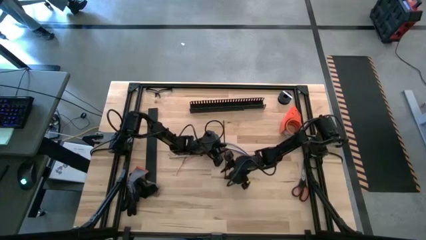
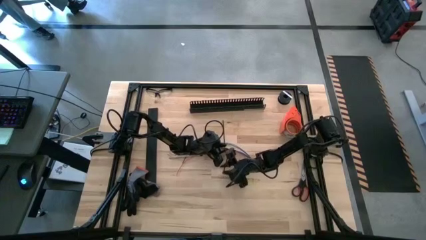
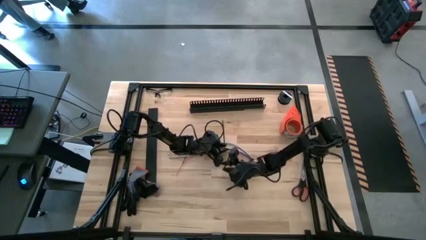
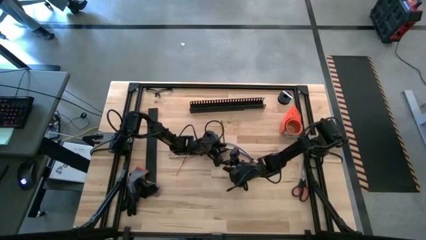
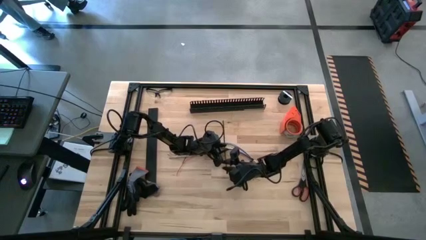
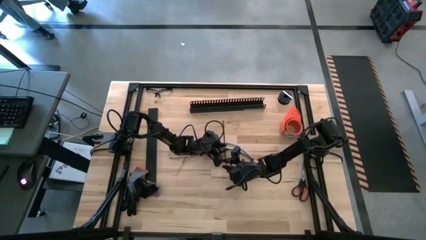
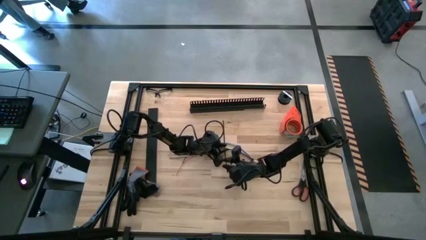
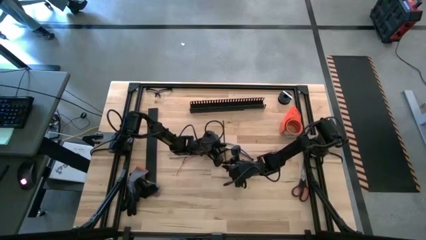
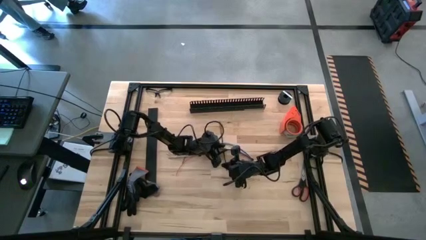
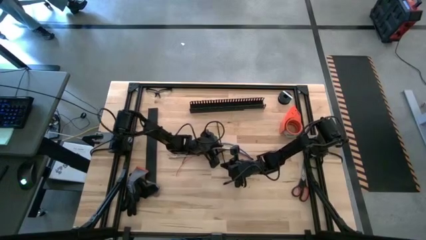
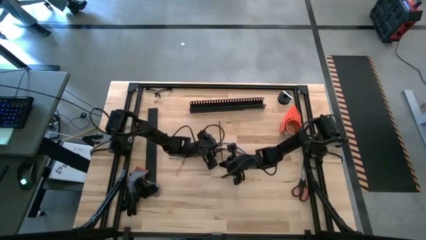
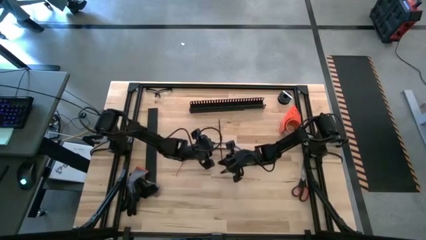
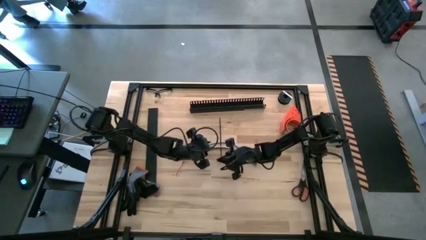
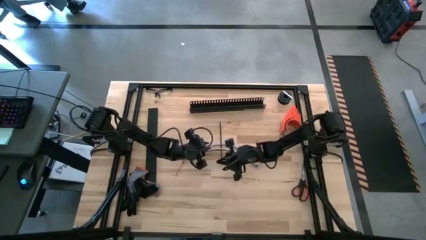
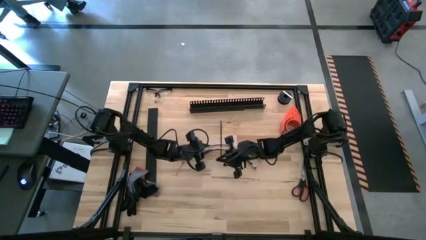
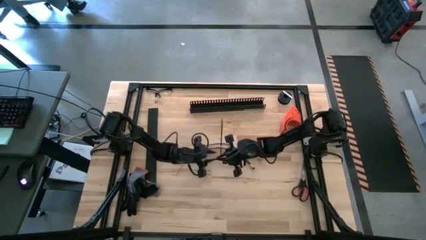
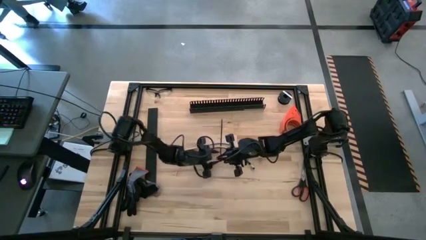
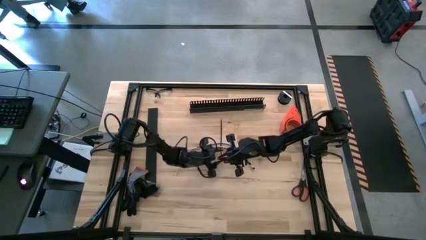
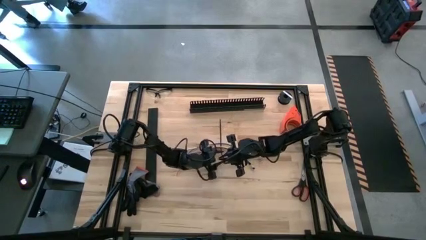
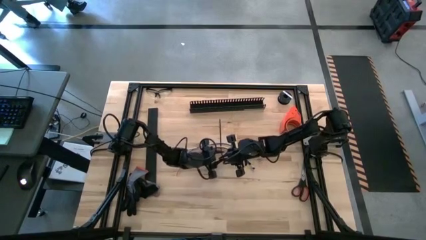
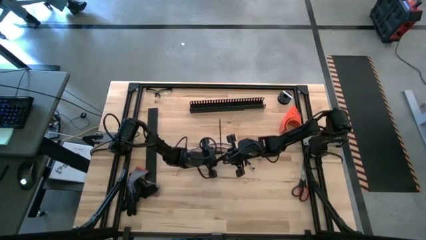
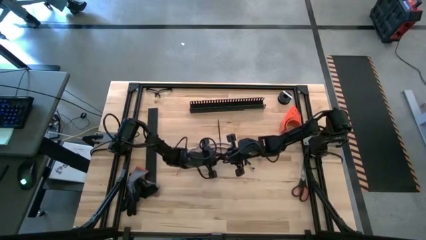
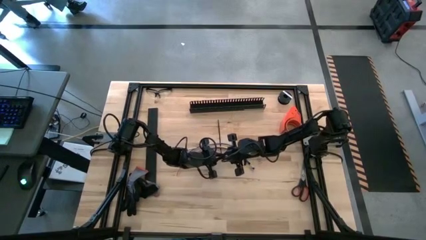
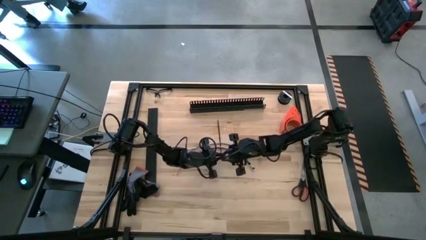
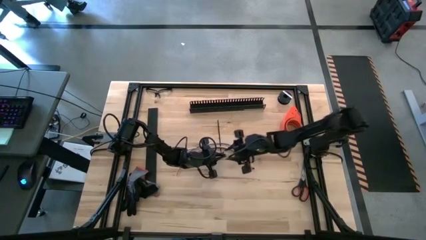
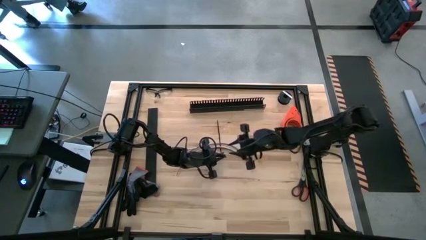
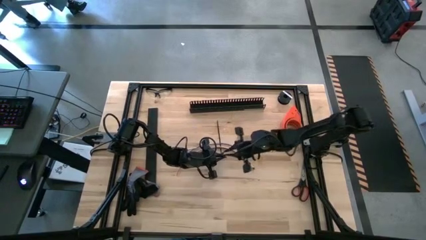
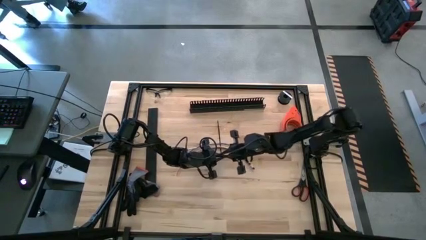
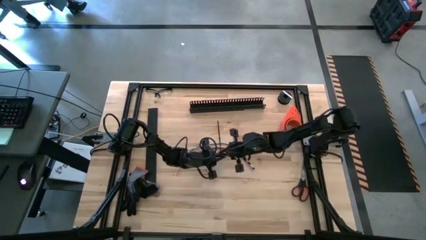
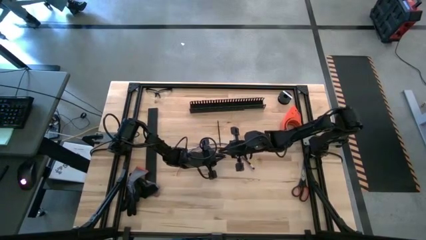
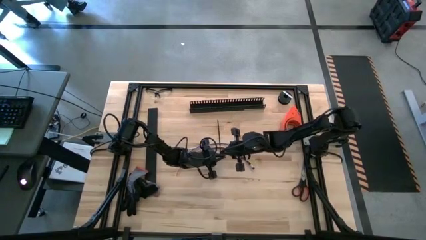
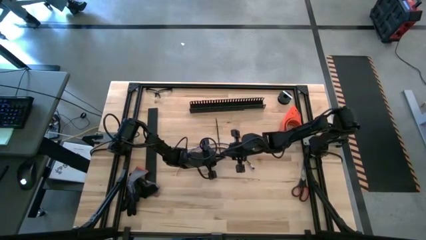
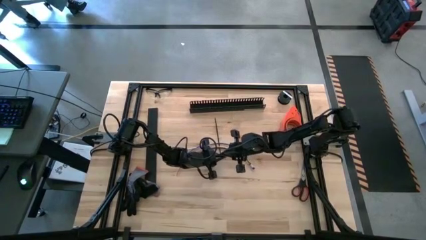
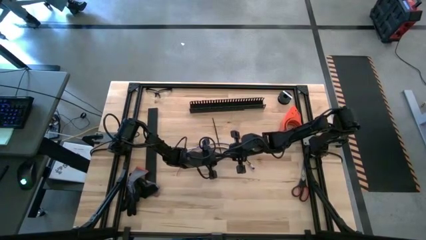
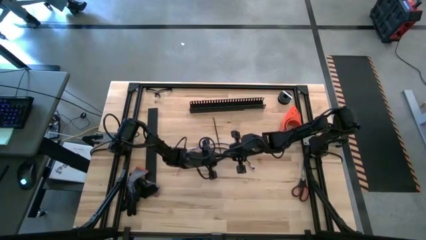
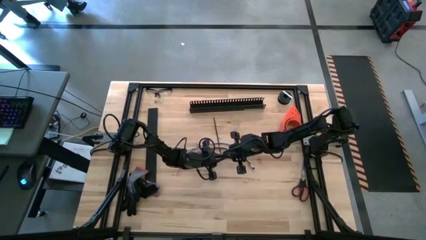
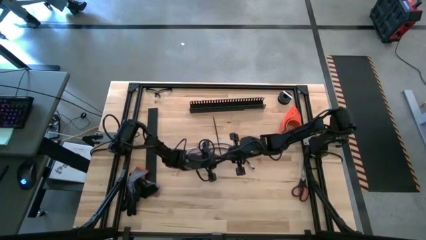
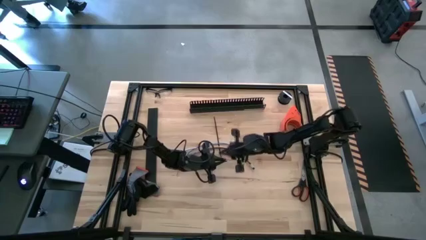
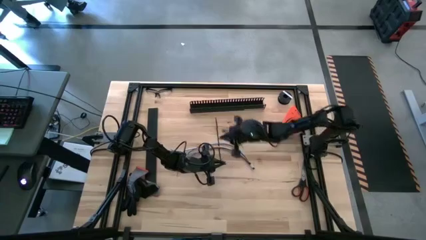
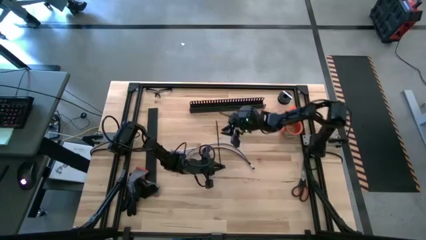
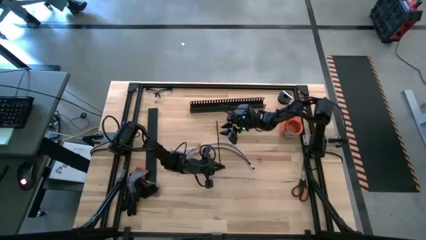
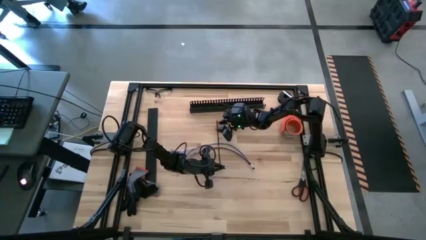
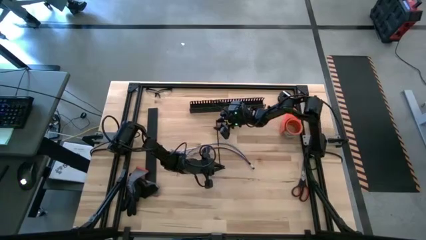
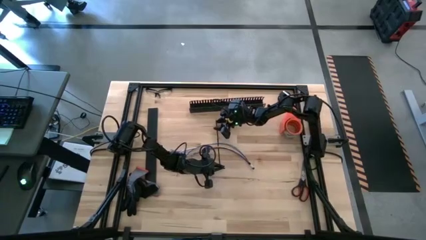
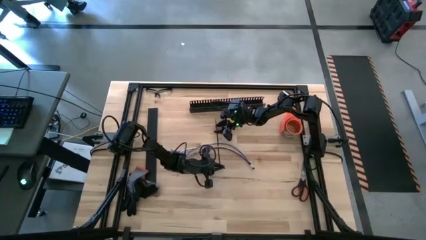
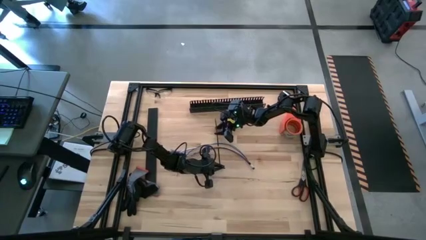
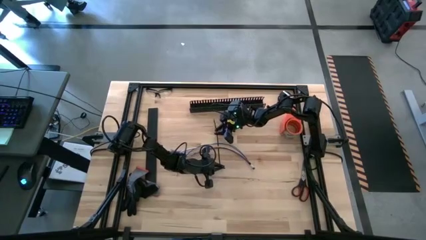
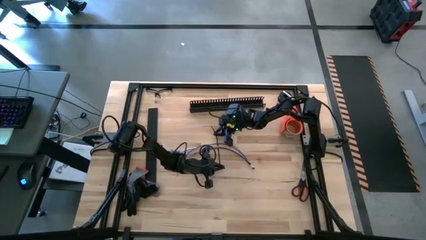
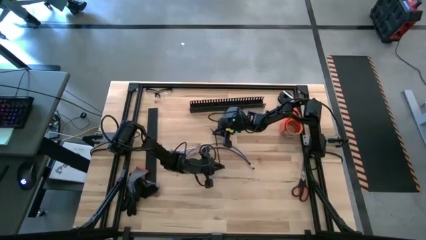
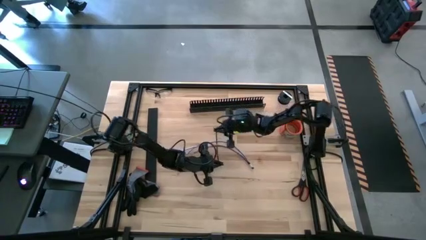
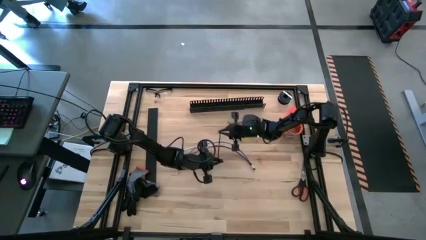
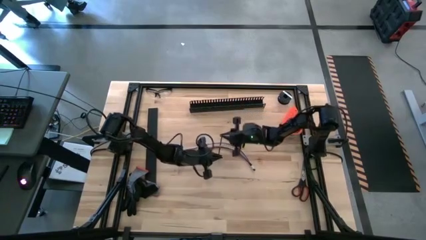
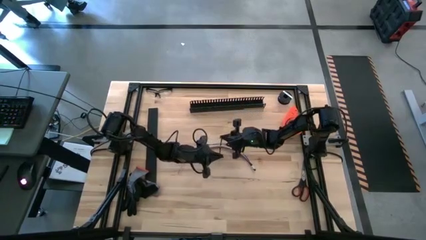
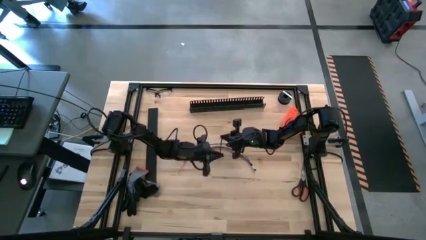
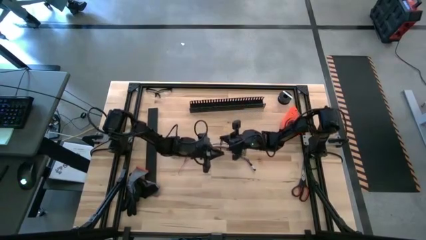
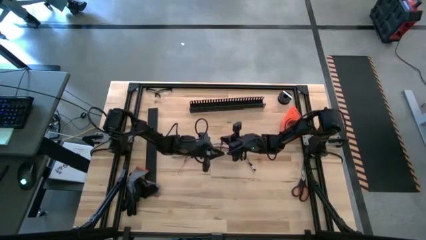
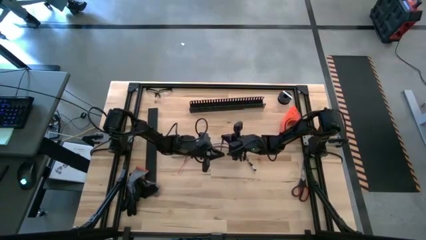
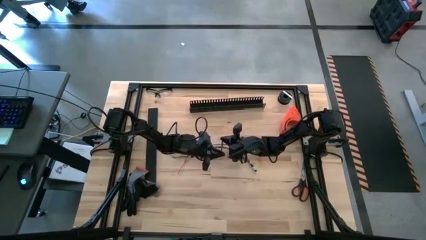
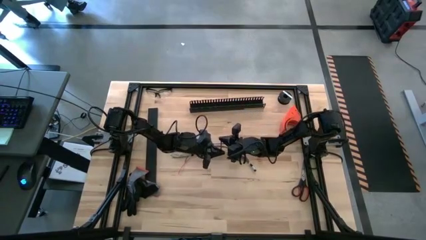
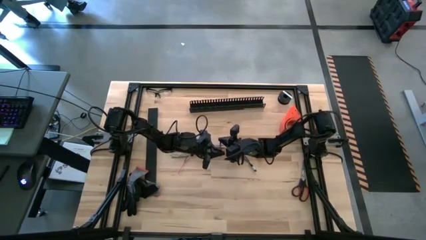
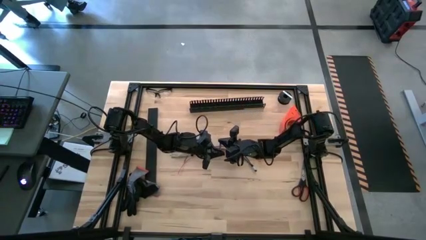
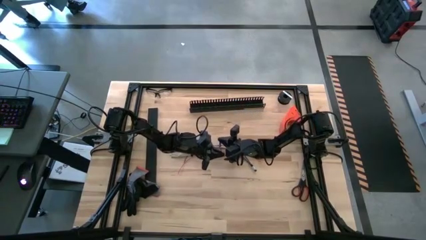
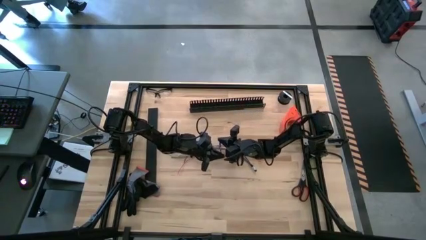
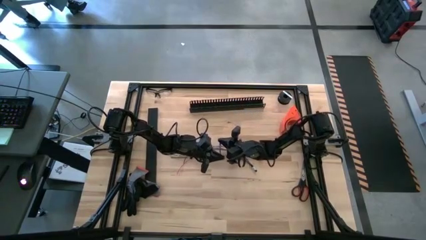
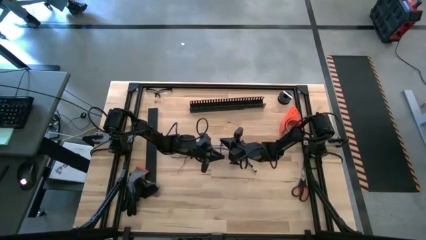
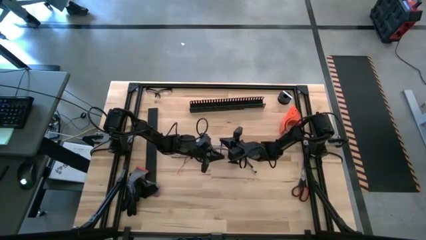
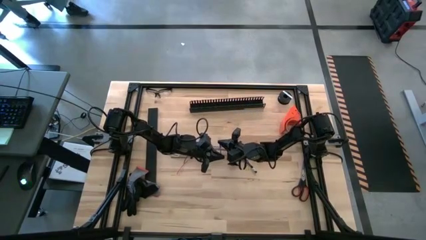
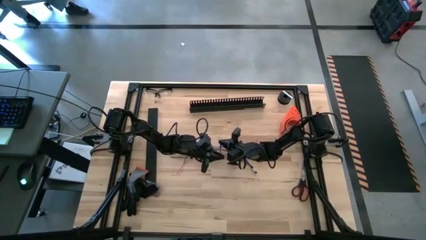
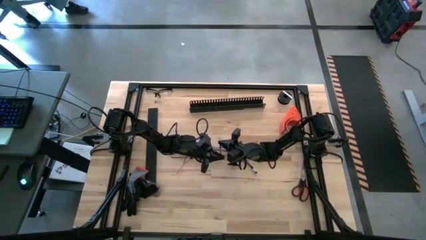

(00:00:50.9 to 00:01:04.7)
Task: Ziptie cables
Wrap the zip tie around the cable wire

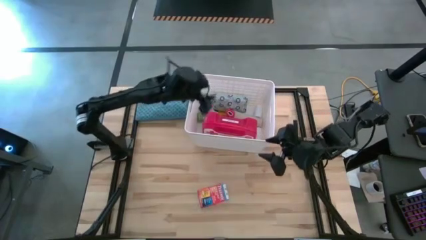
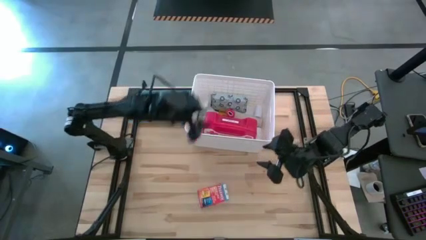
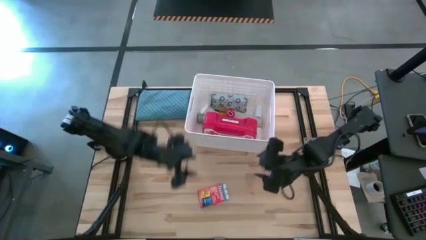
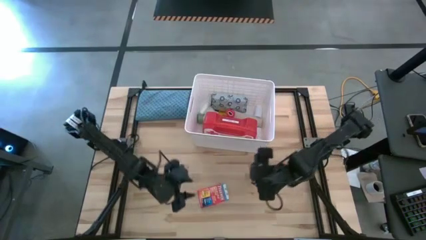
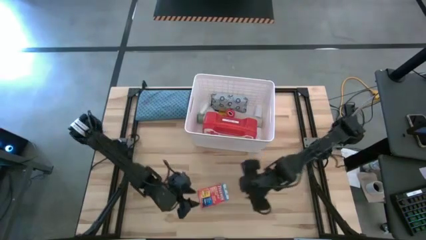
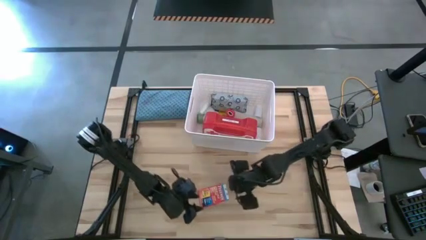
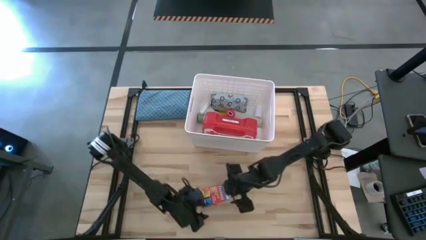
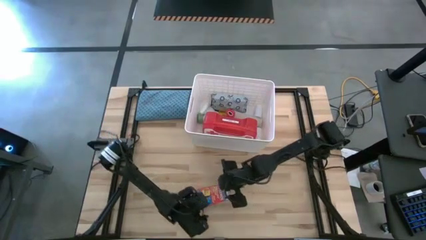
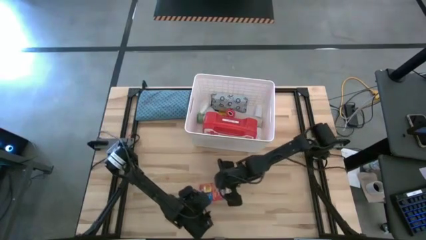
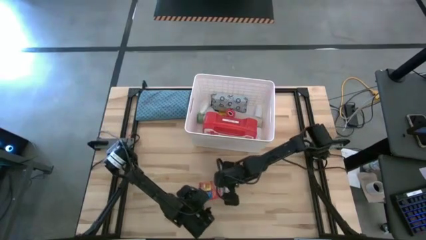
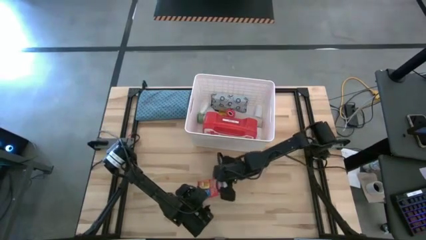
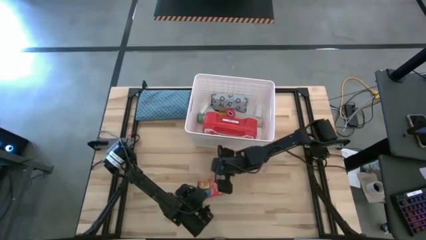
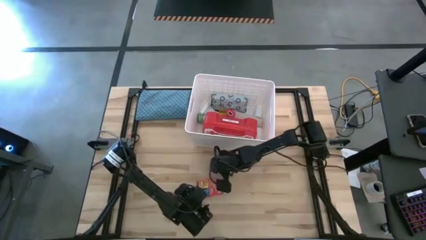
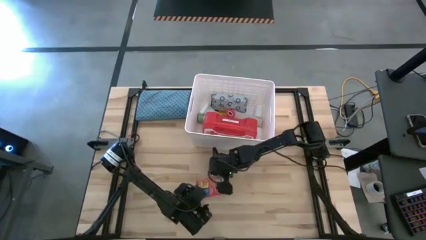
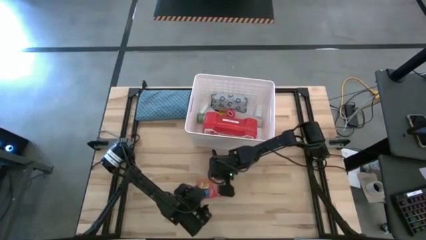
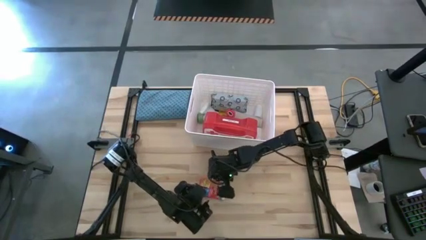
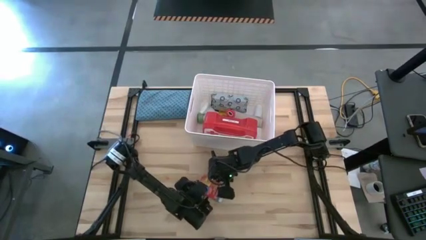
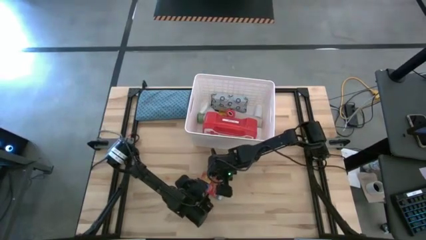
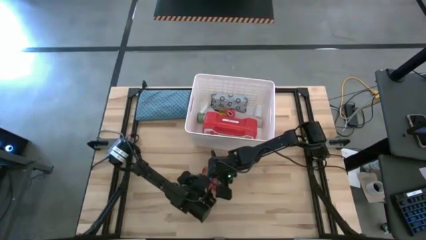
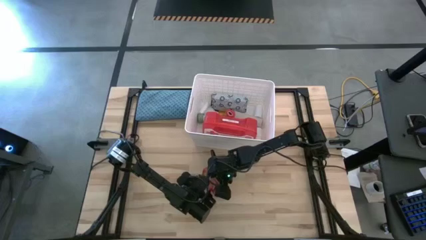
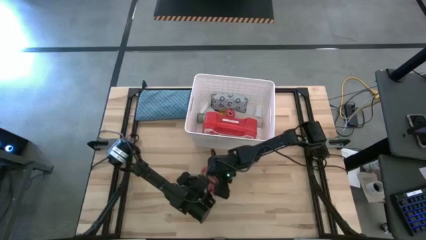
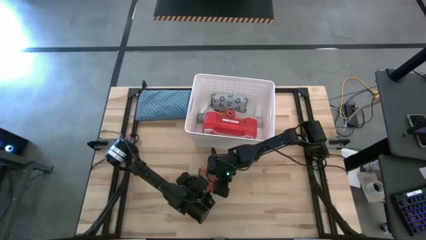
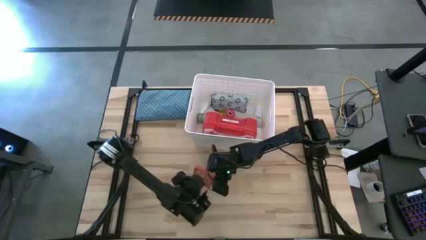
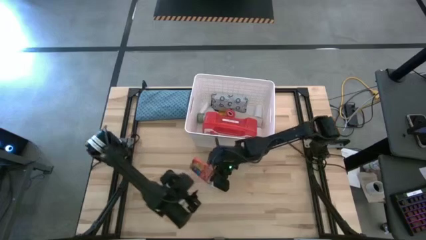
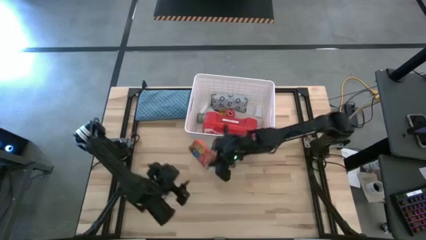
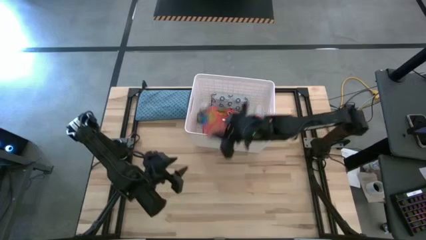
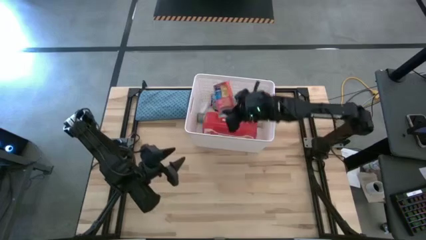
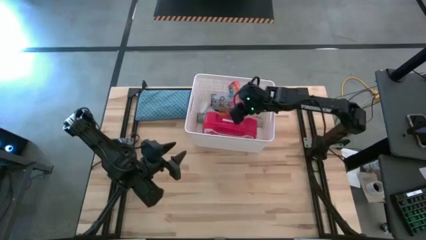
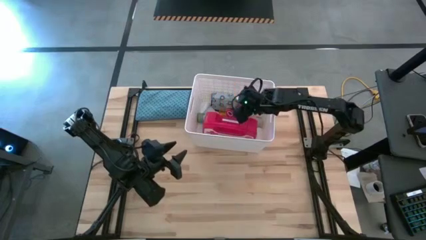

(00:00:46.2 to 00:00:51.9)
Task: Pick & place medical supplies in basket/bin
Put the red pill box into the white bin
